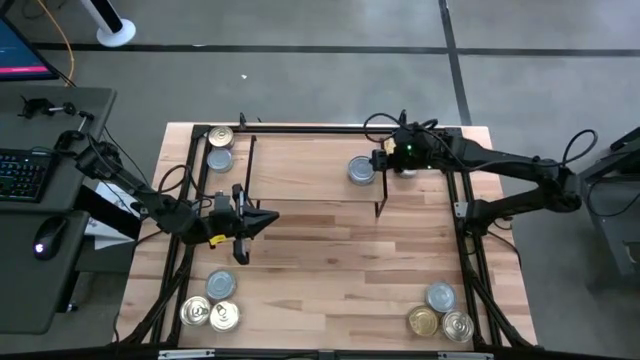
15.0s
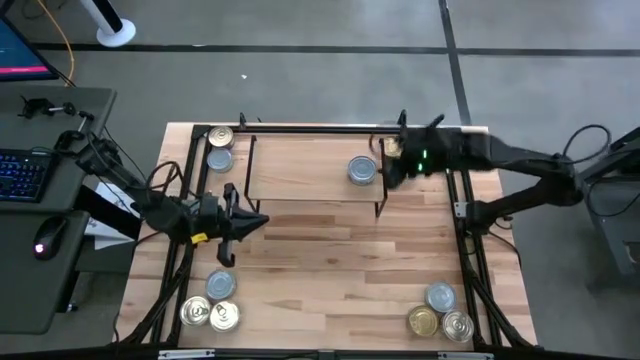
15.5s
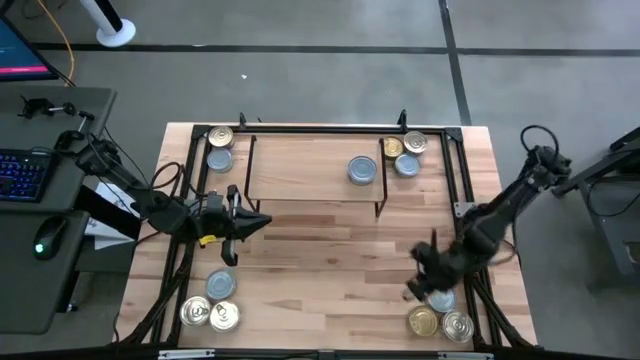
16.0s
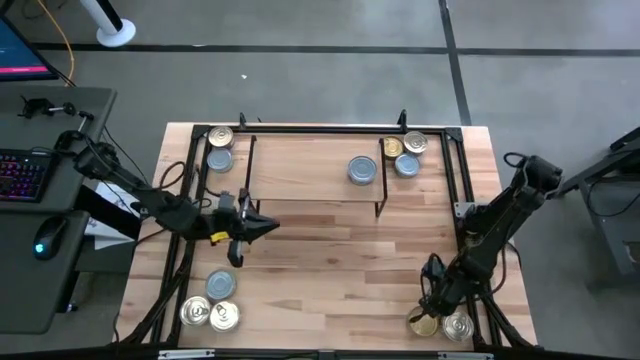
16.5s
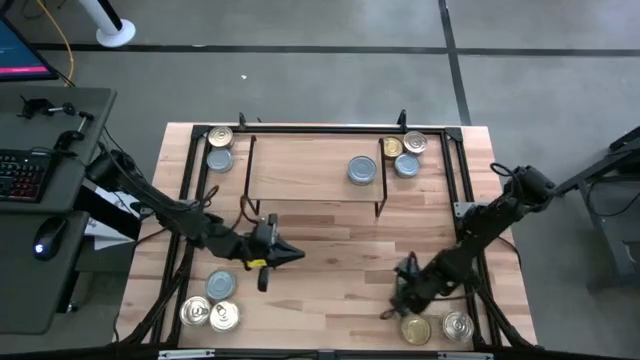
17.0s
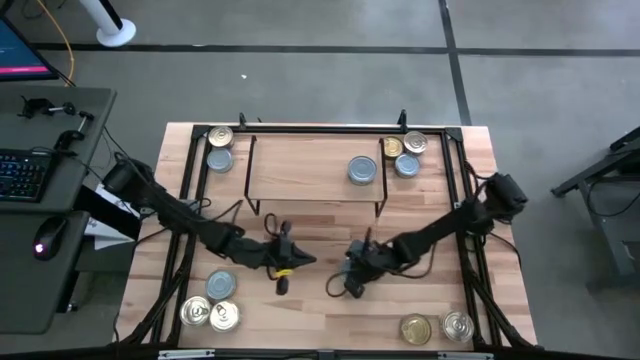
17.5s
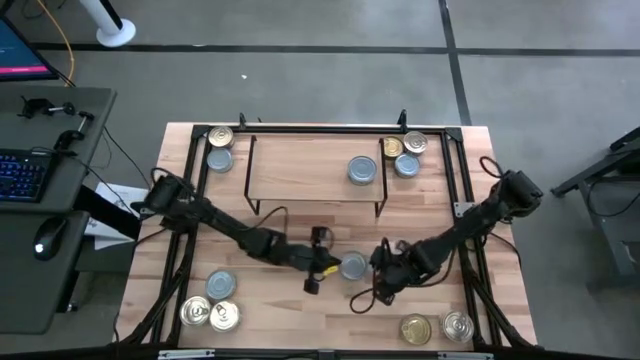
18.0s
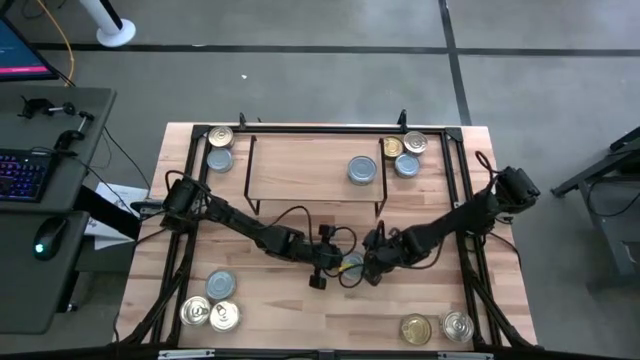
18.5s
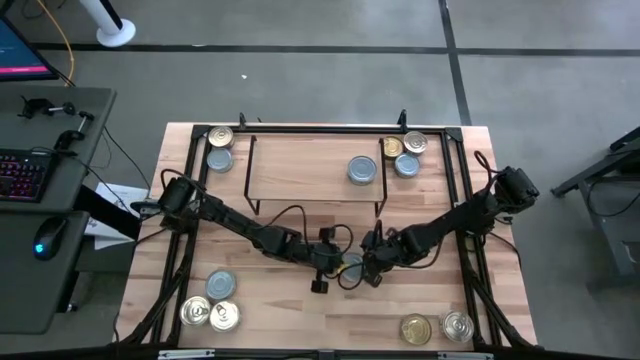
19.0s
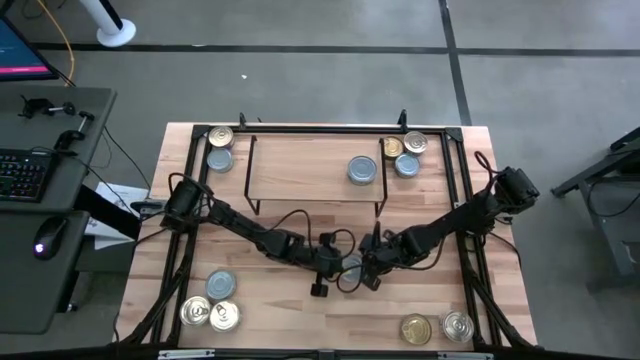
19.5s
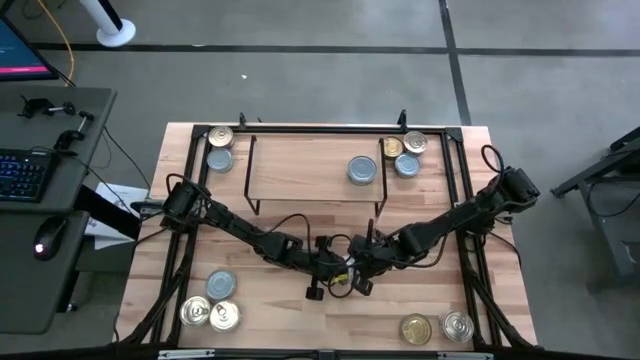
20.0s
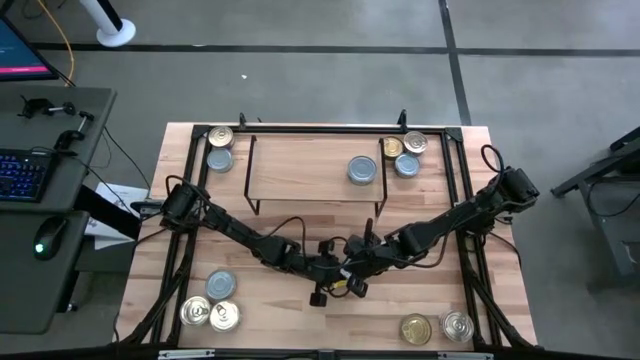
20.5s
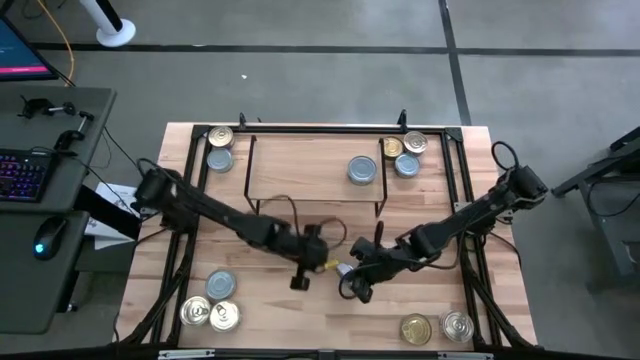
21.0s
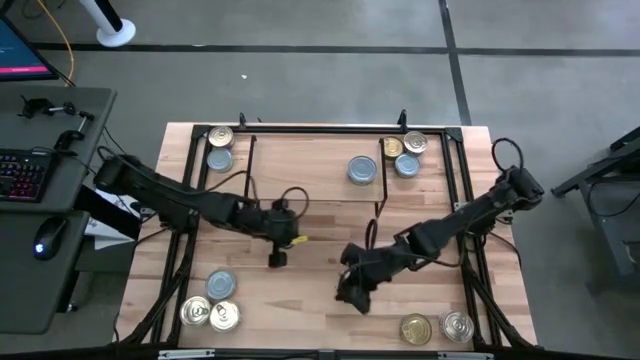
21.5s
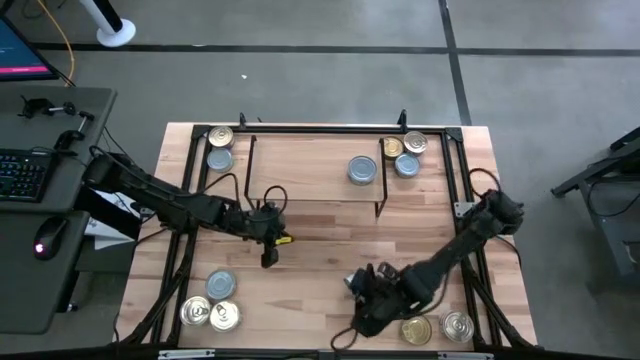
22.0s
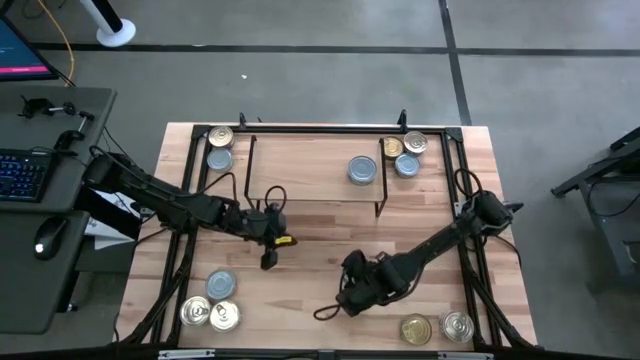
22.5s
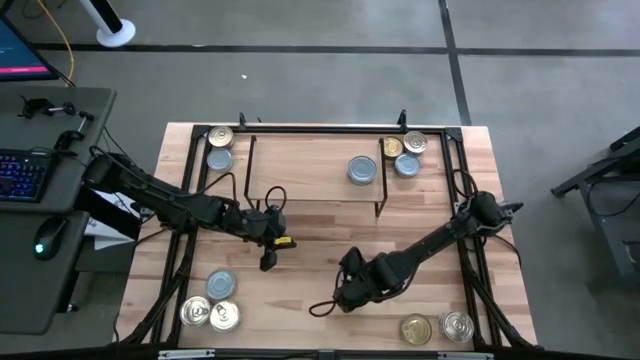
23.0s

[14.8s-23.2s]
Task: Stack canned seafood by type on shelf
Stack the green white tuna can on top of the other green white tuna can on the shelf

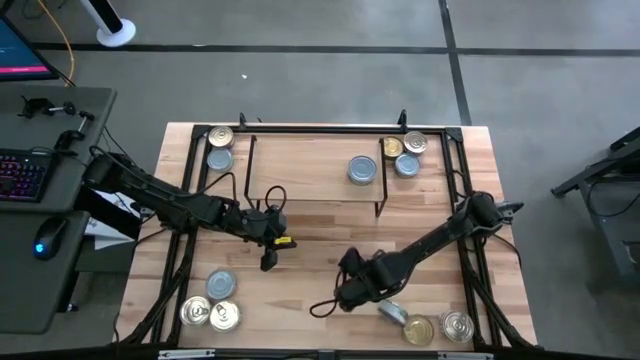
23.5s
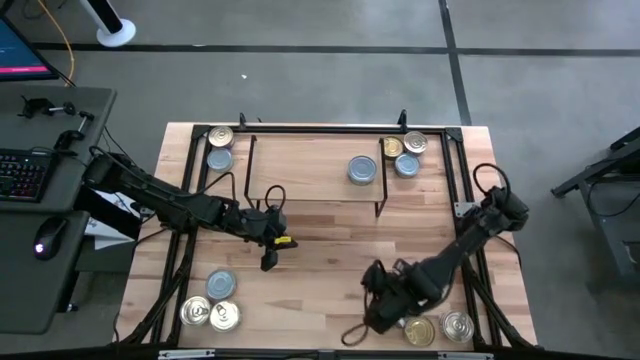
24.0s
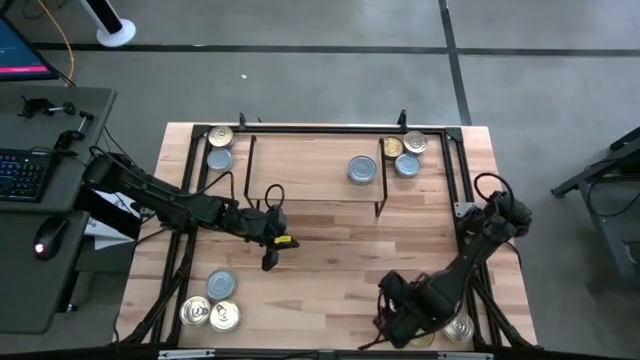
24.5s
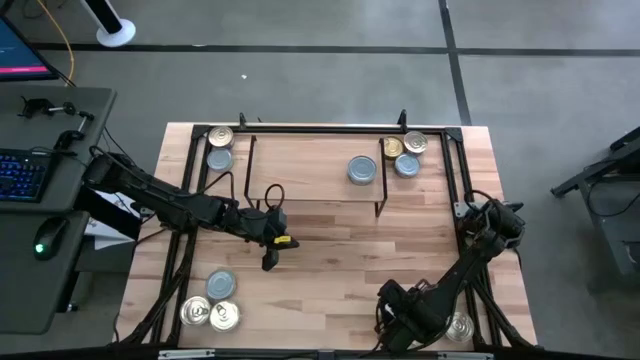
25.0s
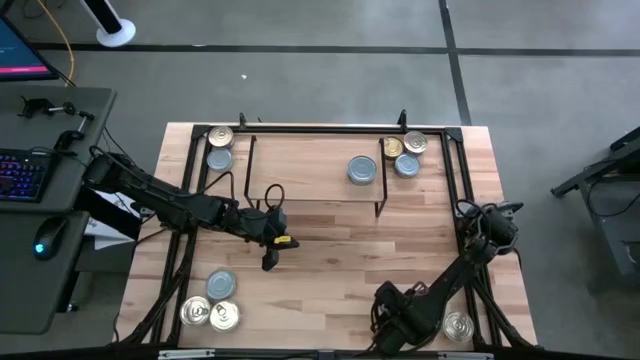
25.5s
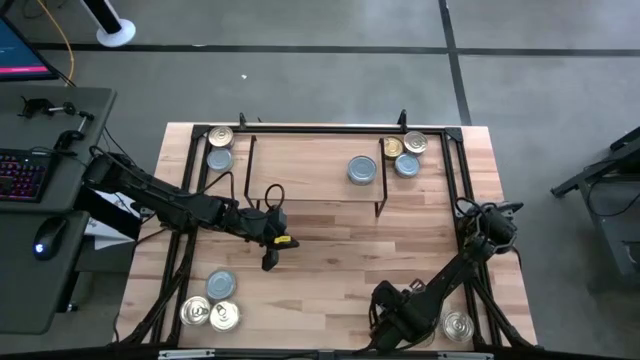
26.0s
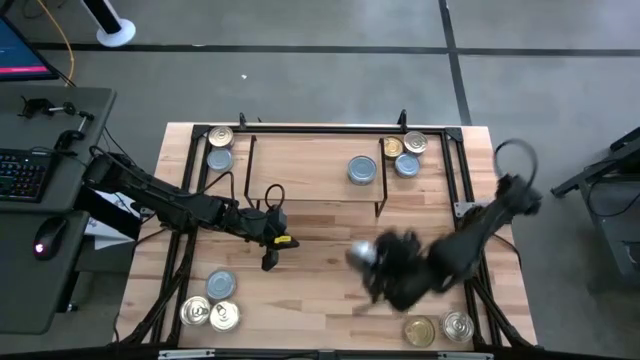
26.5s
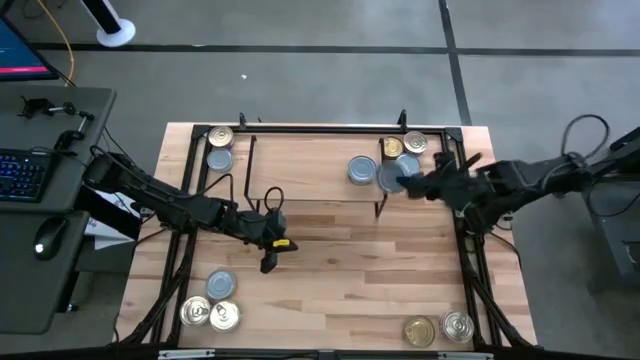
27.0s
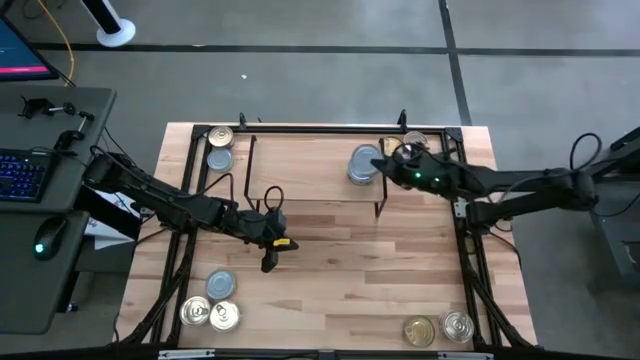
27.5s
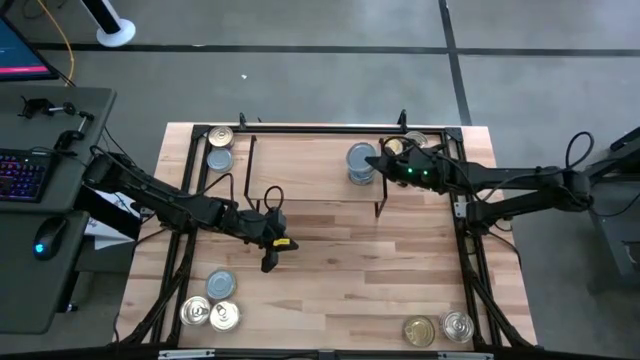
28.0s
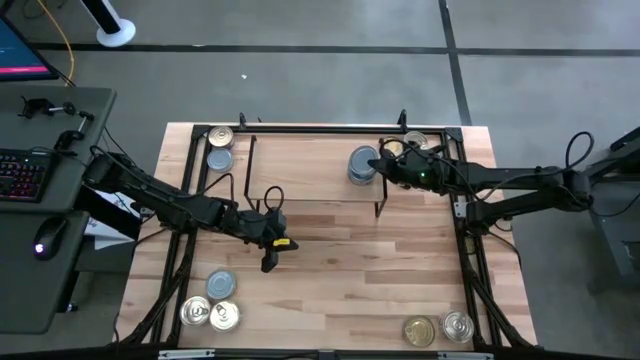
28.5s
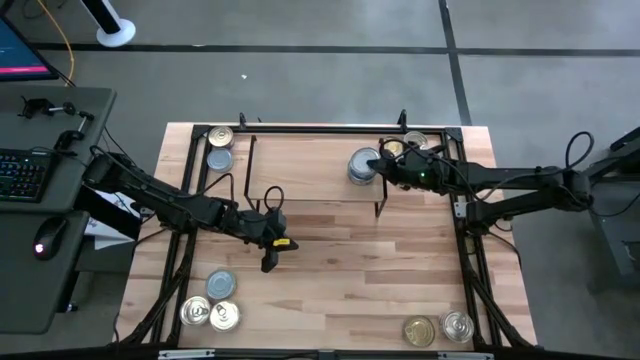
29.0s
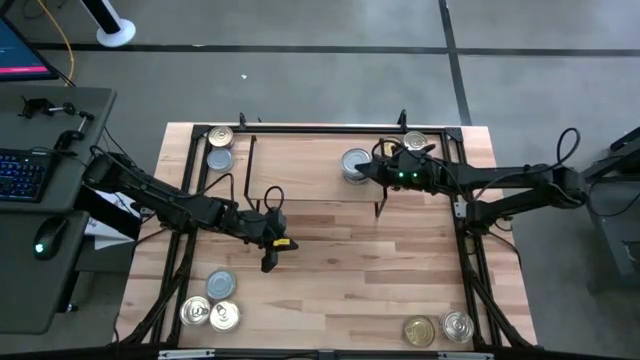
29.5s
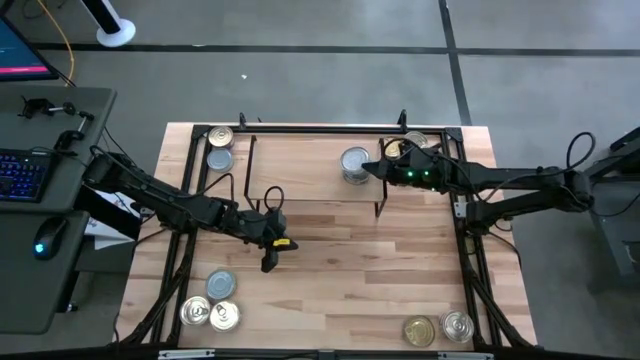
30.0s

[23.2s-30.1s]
Stack the green white tuna can on top of the other green white tuna can on the shelf

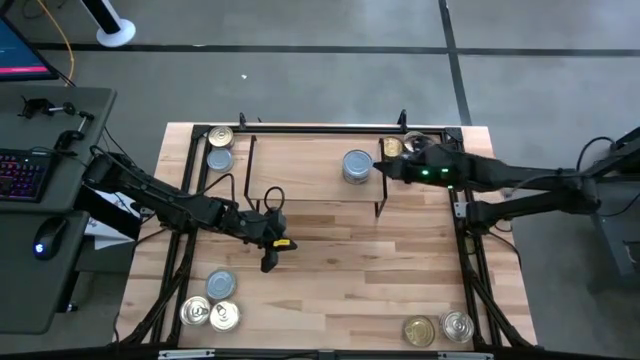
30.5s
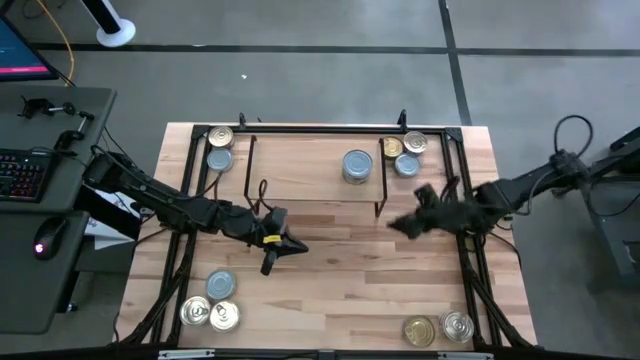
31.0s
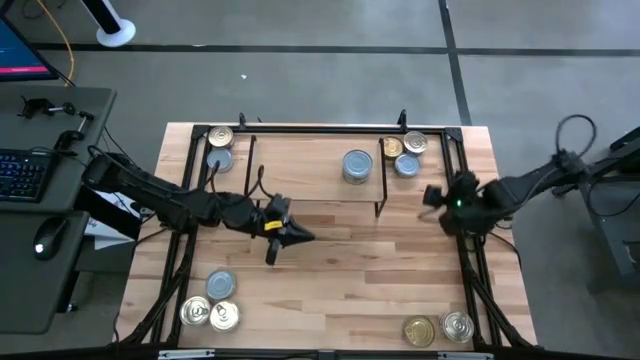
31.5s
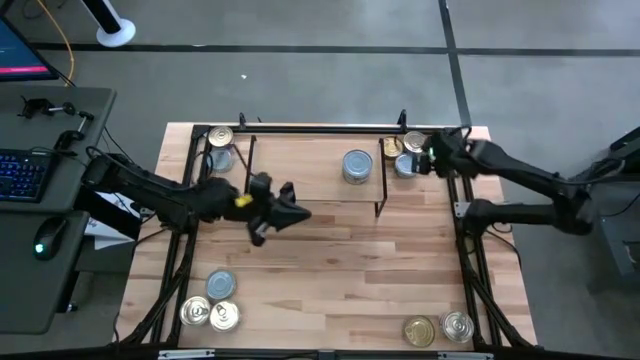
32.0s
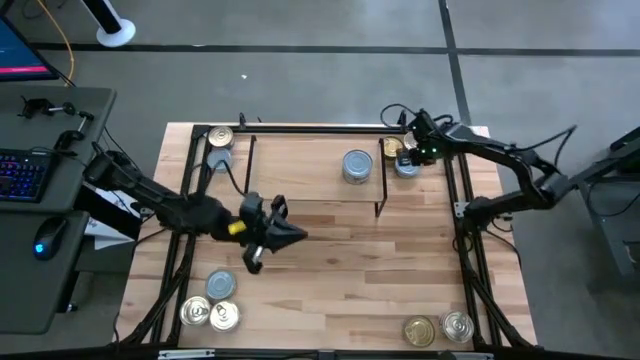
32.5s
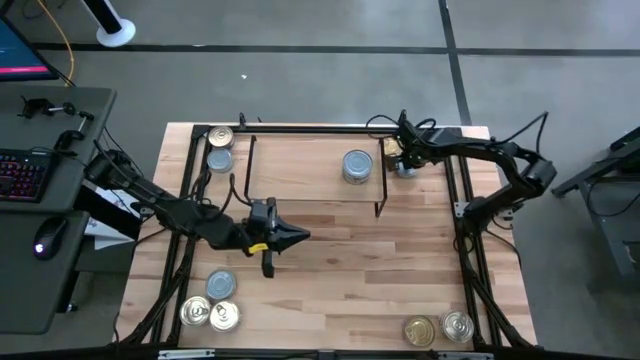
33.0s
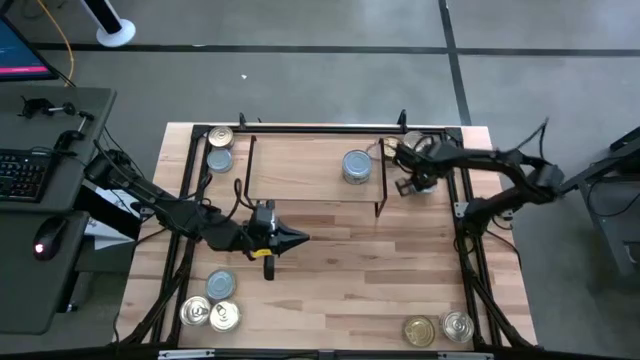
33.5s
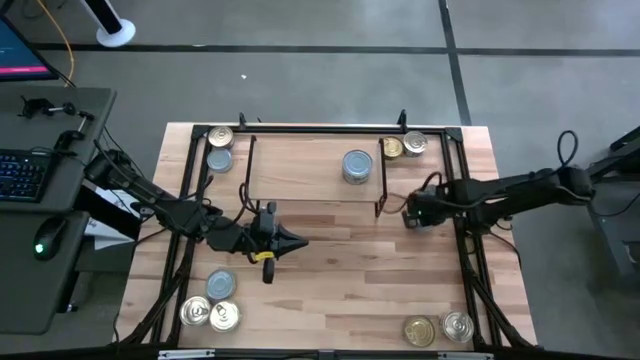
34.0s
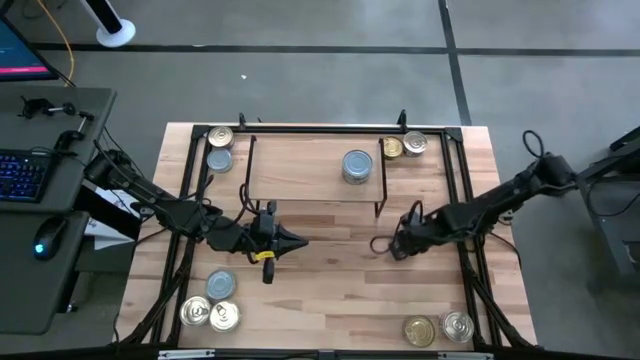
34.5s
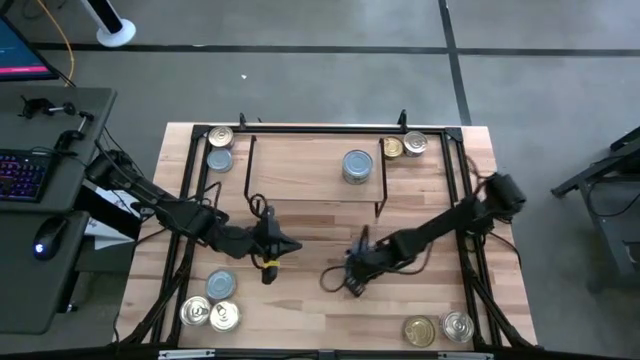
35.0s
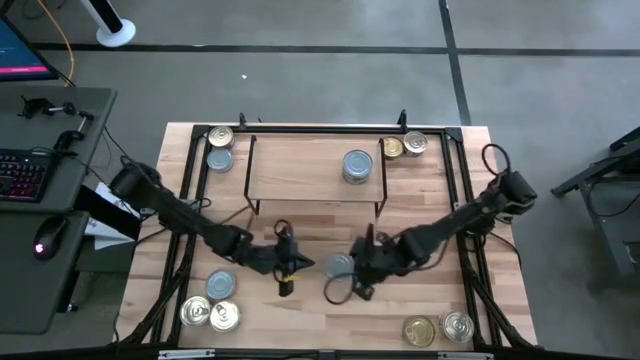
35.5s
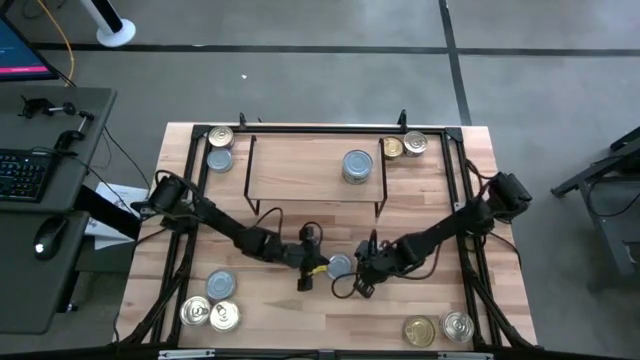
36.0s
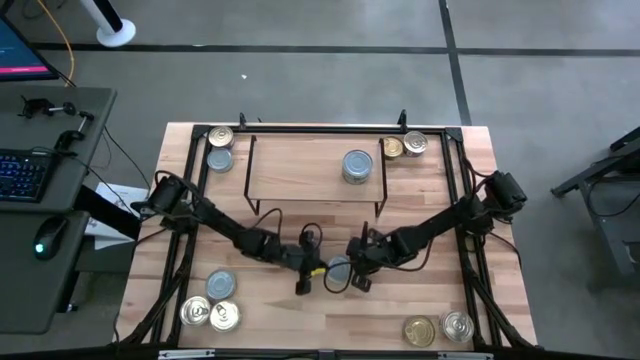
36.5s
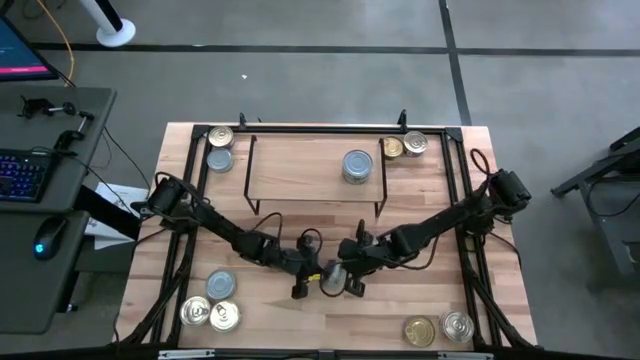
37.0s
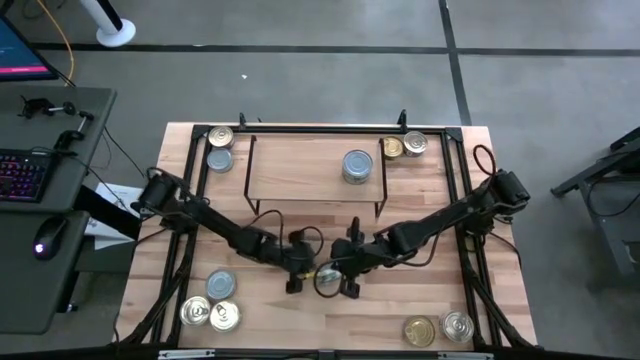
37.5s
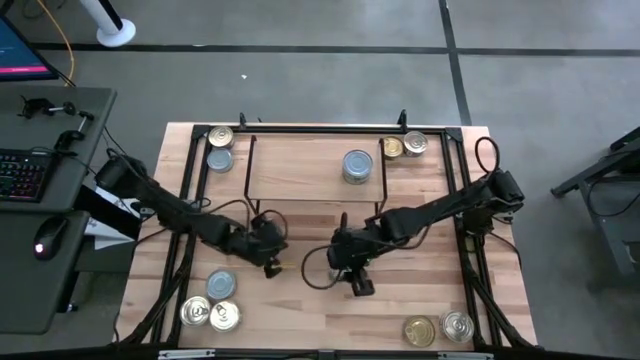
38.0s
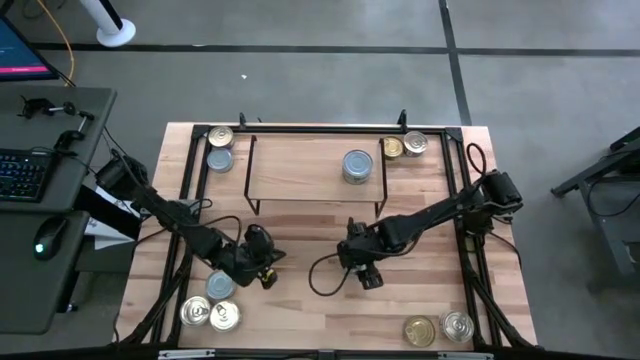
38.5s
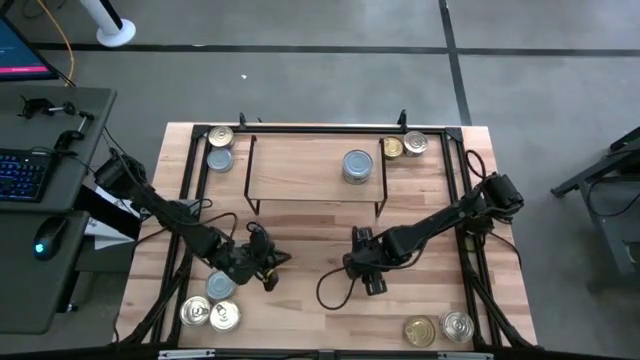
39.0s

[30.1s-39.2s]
Stack the green white tuna can on top of the other green white tuna can on the shelf
